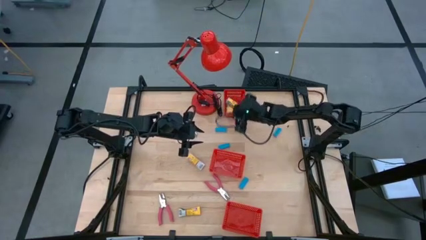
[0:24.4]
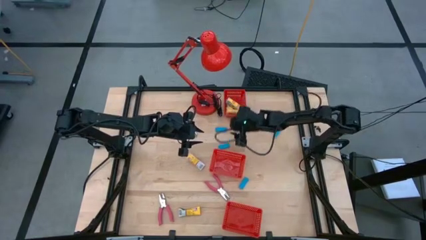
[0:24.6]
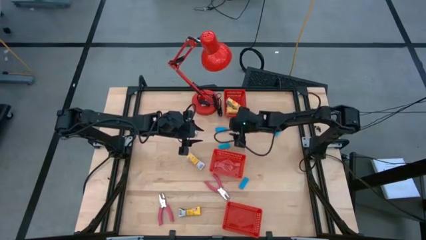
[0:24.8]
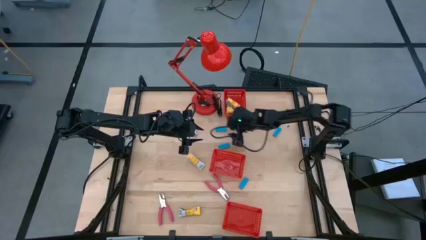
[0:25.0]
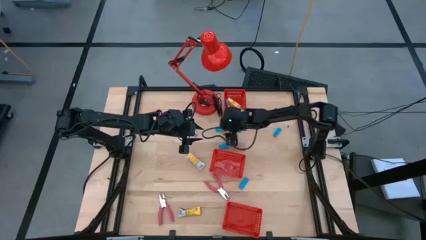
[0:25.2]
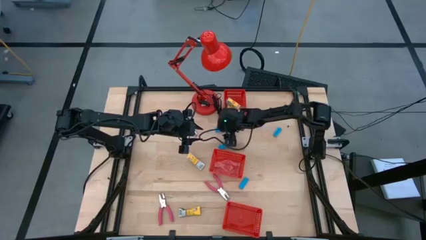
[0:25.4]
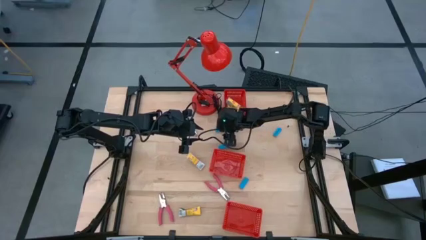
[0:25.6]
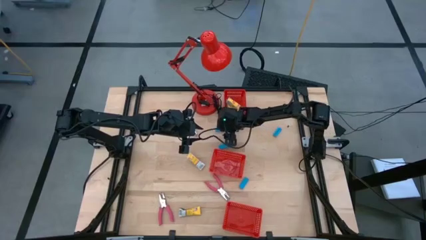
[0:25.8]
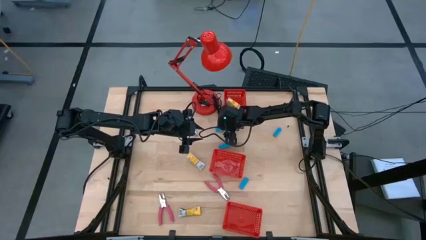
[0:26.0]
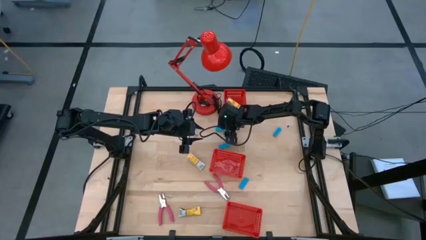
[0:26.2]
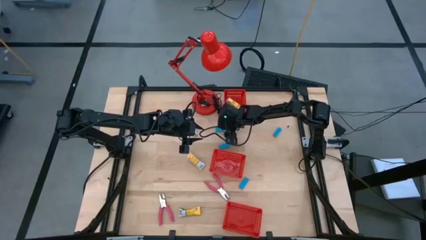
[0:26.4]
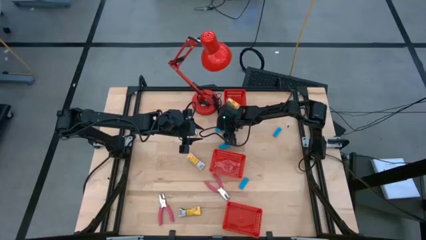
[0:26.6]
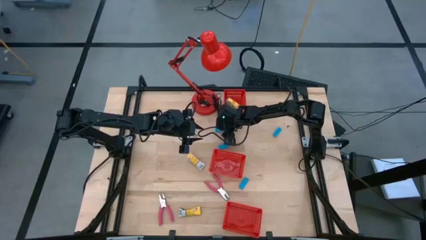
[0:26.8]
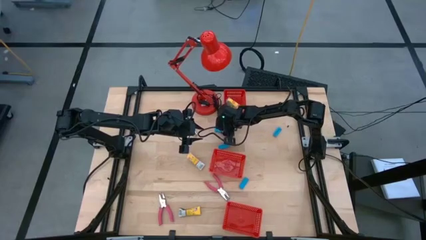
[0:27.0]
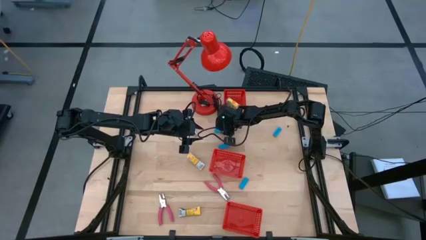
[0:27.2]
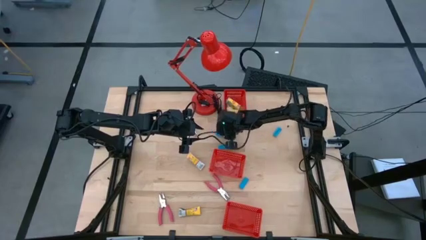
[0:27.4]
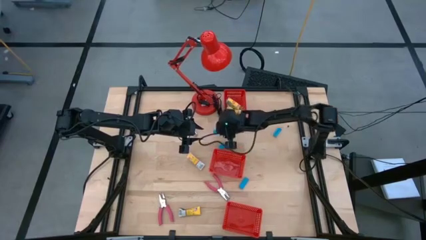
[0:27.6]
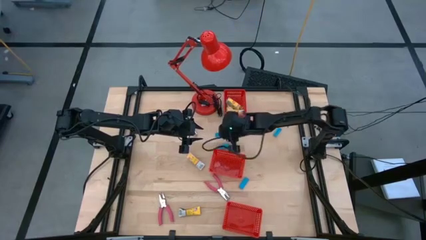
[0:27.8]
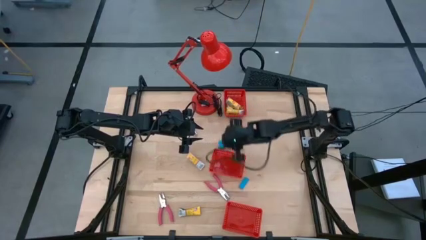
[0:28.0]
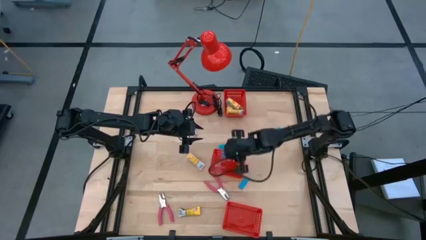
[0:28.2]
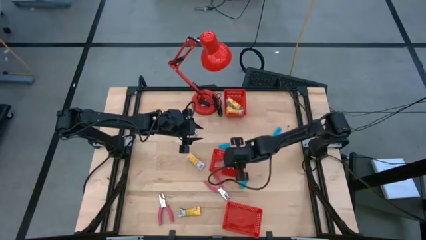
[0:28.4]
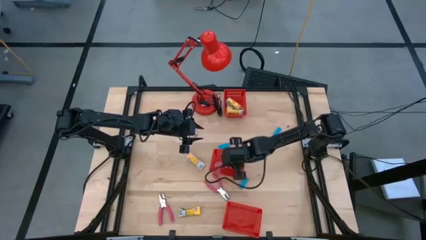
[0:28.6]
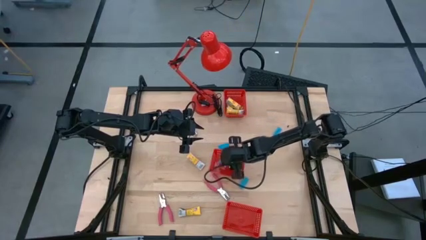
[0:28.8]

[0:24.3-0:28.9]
Task: Pick & Place School Supplies
Put the blue eraser into the middle red basket

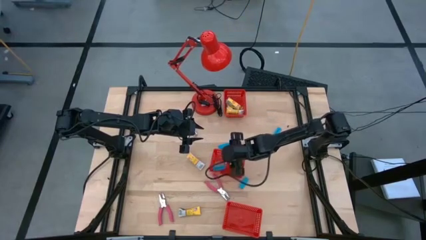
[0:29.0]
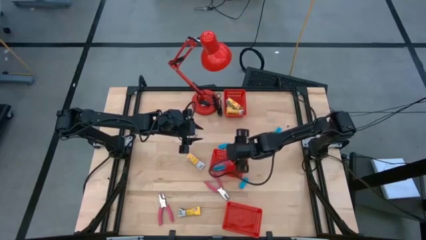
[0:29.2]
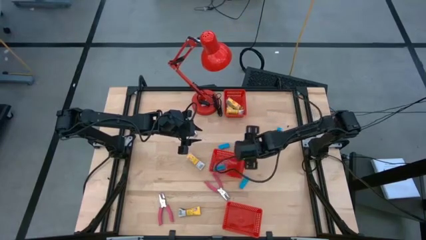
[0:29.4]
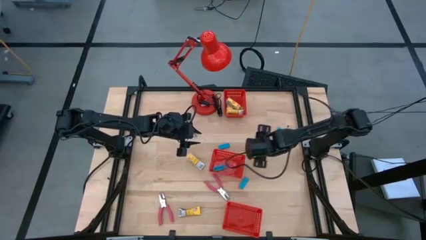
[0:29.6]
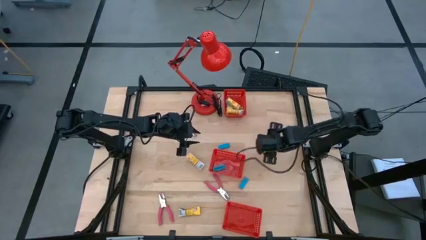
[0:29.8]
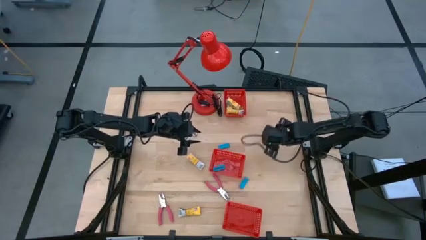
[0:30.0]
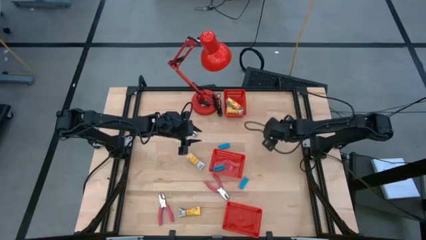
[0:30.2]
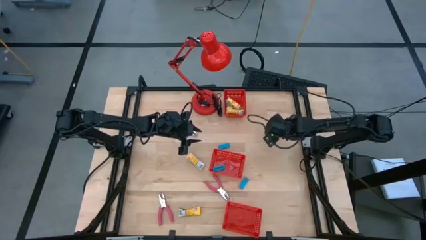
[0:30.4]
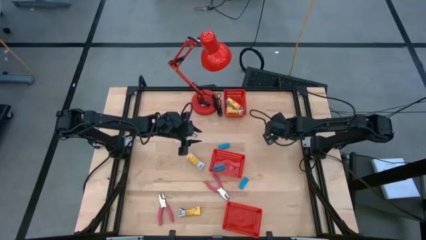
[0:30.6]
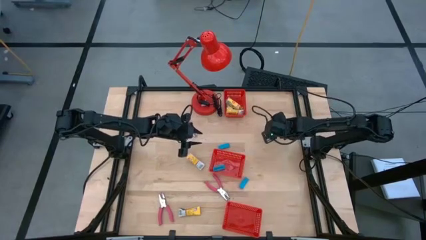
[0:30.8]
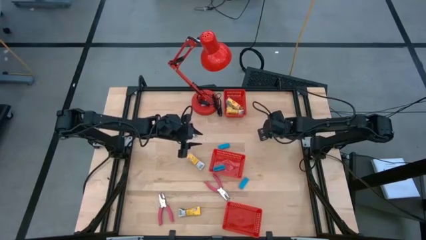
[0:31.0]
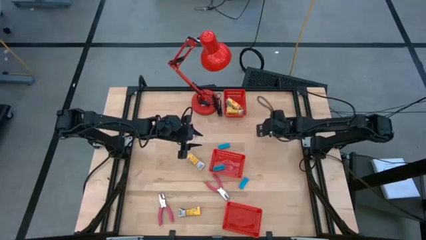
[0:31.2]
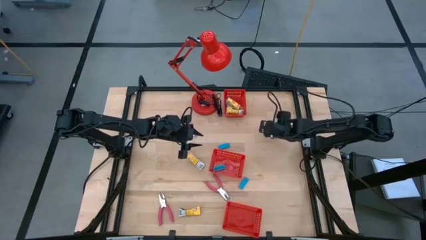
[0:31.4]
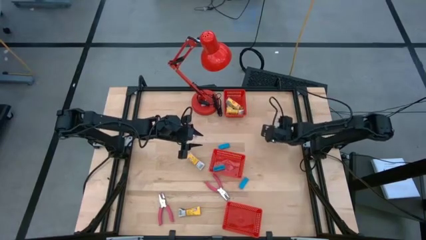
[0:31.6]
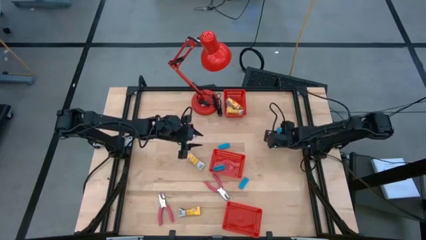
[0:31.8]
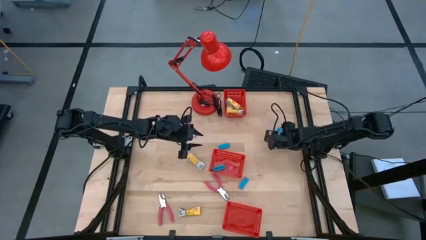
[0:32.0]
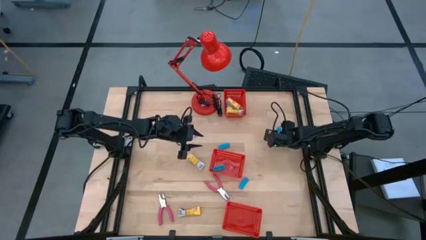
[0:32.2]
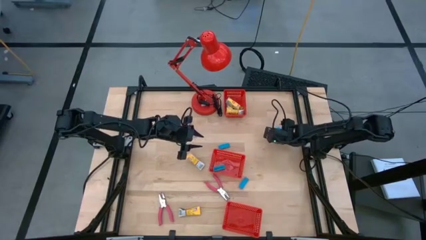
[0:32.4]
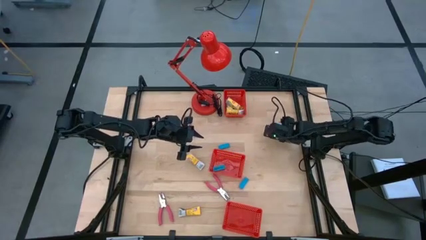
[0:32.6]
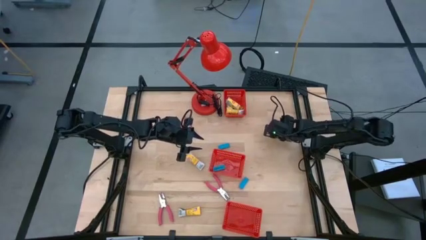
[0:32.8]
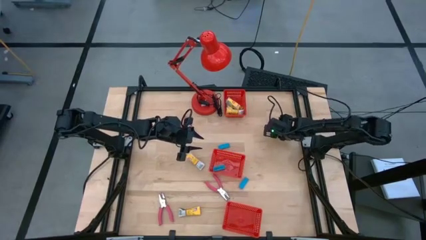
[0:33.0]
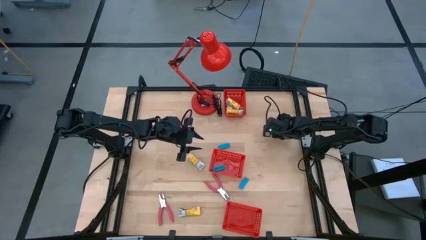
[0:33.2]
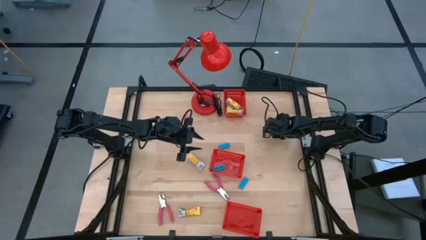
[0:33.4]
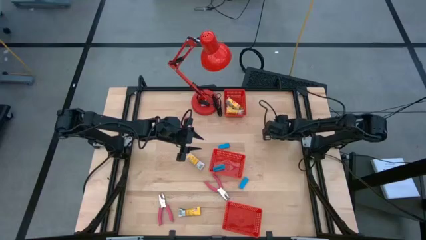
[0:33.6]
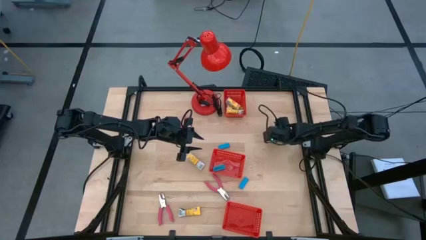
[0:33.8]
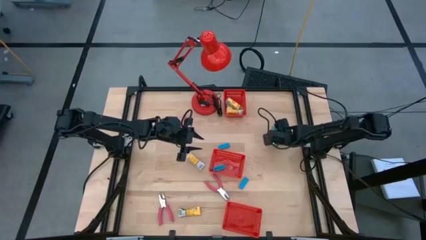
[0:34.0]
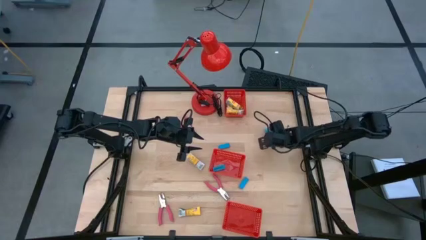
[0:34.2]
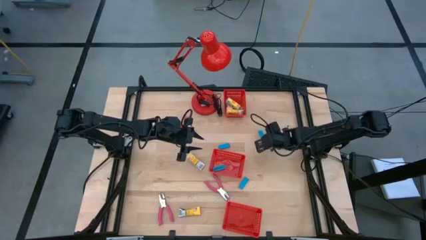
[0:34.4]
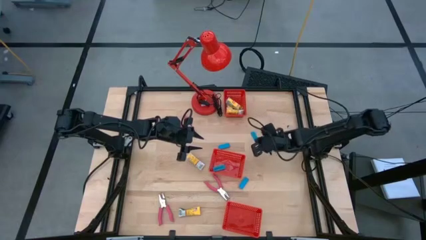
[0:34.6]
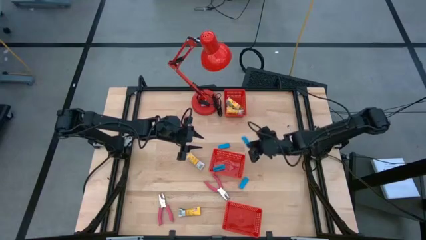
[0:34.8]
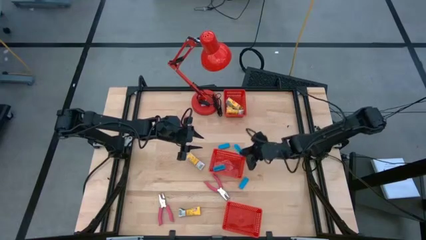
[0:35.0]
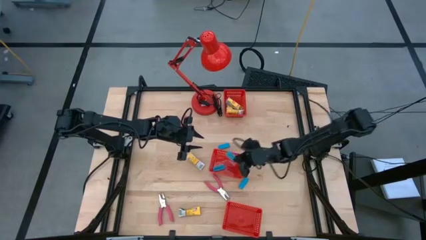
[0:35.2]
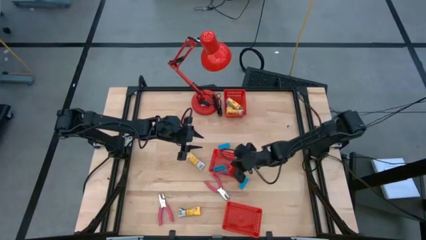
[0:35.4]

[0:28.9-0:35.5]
Put the blue eraser into the middle red basket

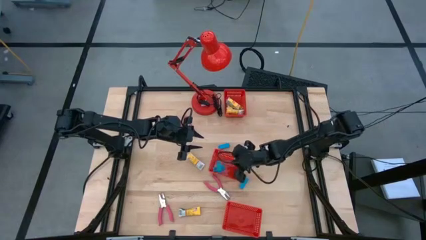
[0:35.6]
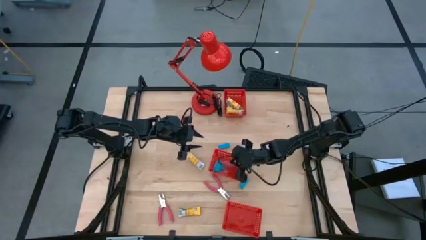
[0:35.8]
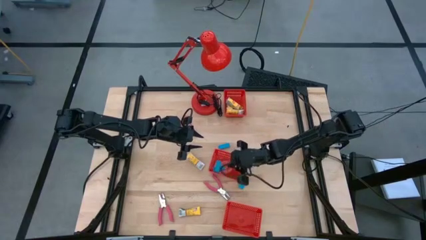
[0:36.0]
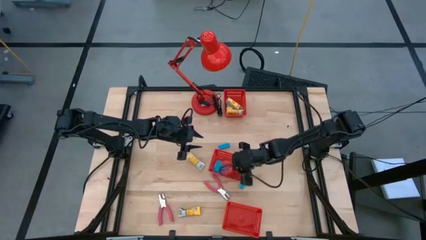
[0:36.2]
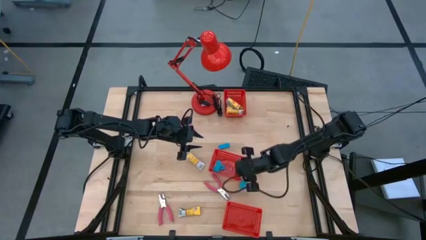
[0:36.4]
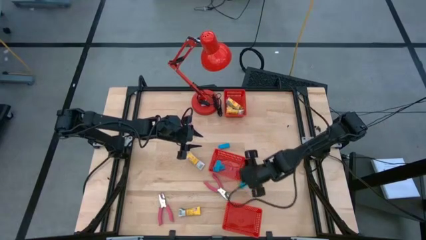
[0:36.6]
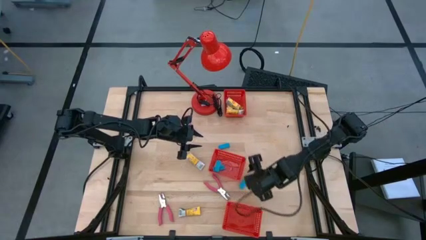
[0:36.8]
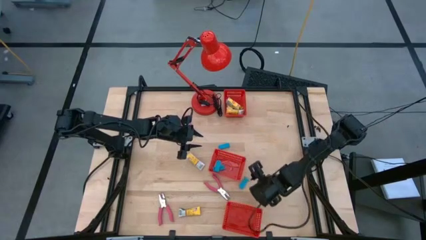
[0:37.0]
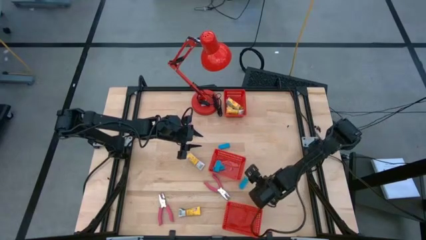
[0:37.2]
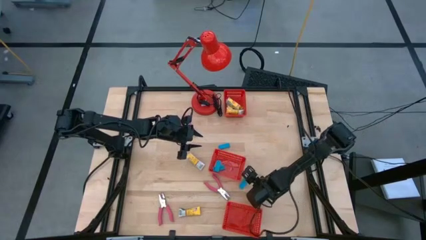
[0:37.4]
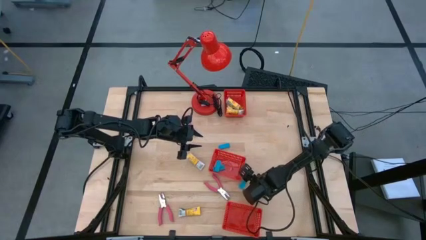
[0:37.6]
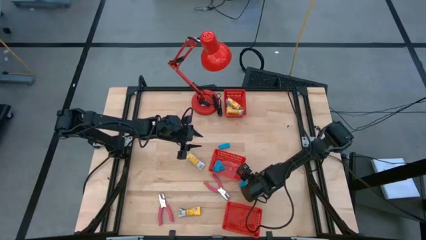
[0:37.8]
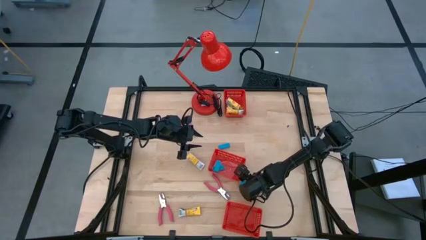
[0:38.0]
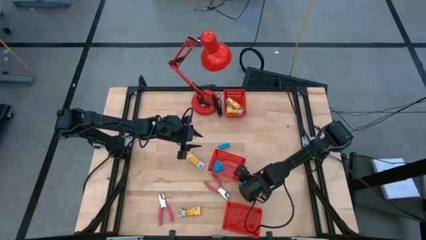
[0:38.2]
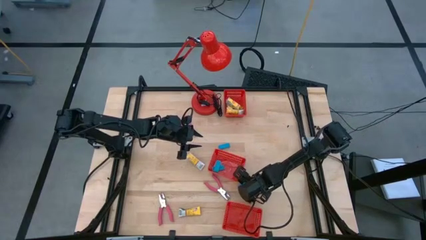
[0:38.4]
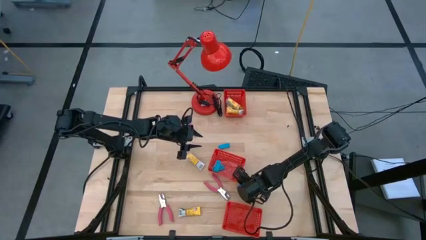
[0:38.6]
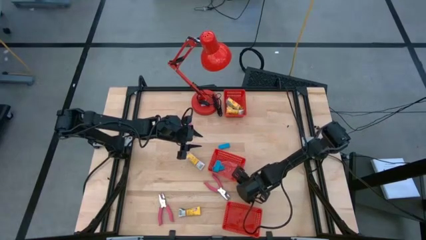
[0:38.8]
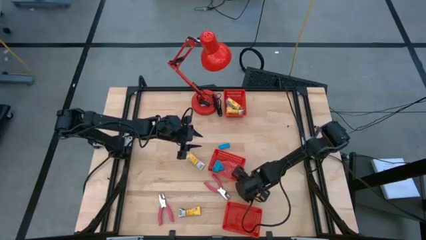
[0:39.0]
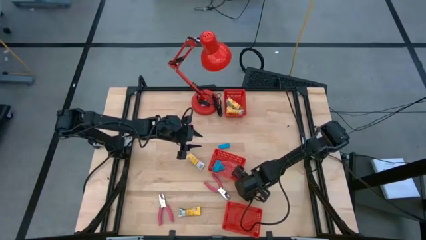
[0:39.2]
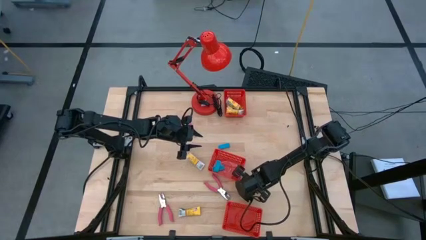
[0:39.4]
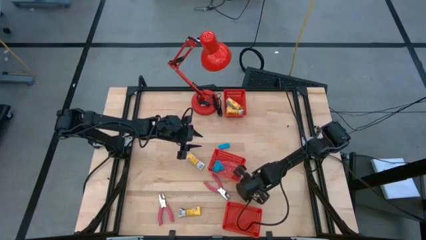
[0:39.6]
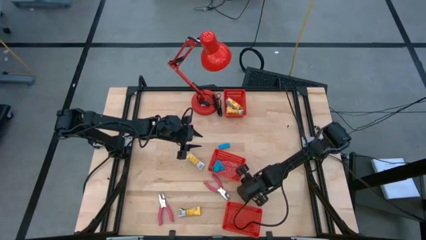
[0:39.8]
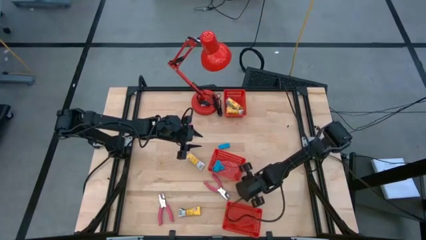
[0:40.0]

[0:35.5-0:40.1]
Put the blue eraser into the middle red basket
